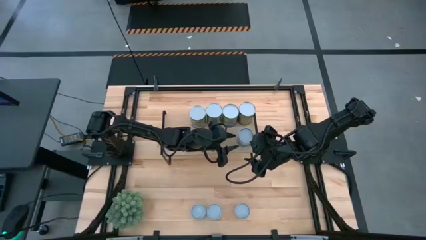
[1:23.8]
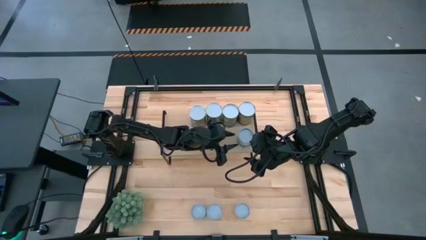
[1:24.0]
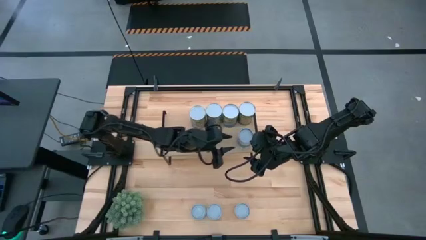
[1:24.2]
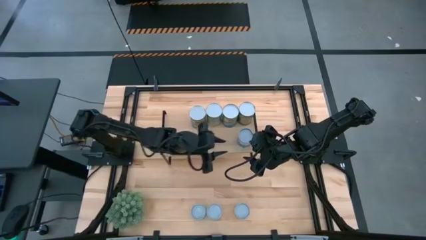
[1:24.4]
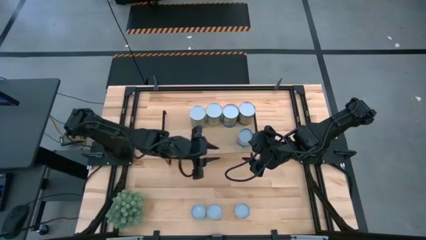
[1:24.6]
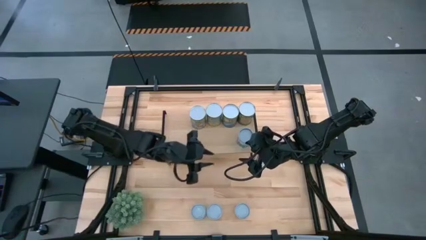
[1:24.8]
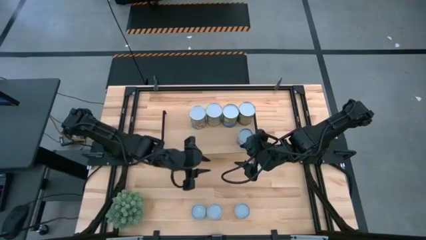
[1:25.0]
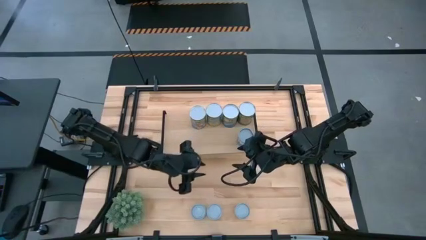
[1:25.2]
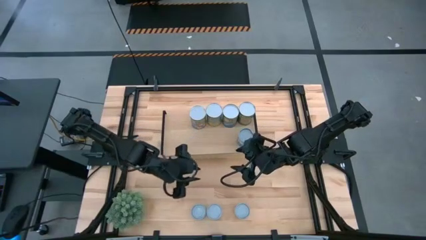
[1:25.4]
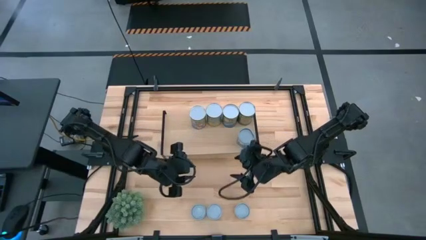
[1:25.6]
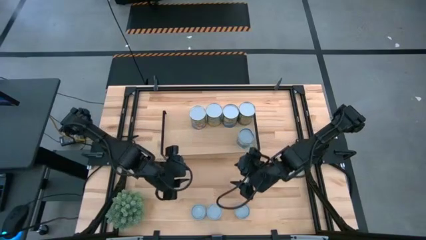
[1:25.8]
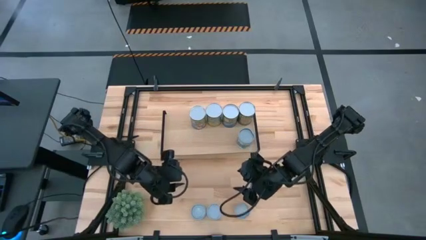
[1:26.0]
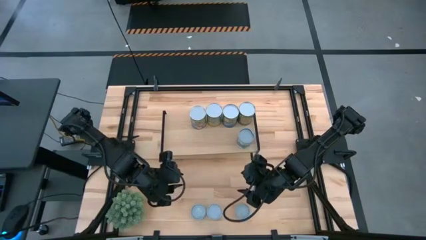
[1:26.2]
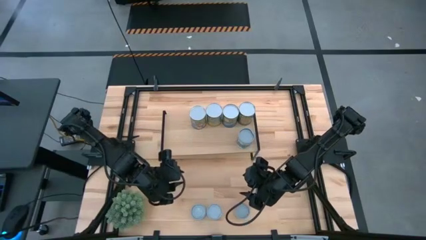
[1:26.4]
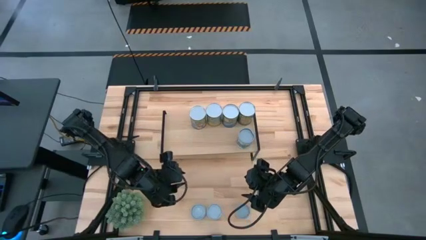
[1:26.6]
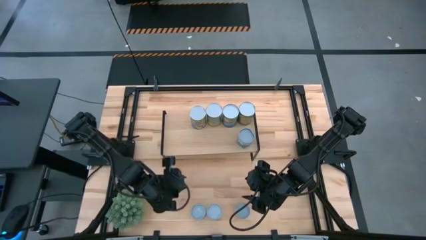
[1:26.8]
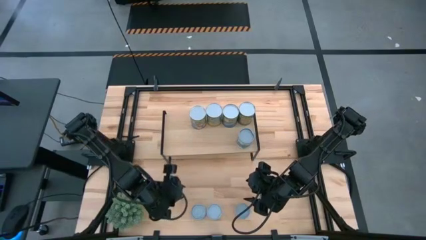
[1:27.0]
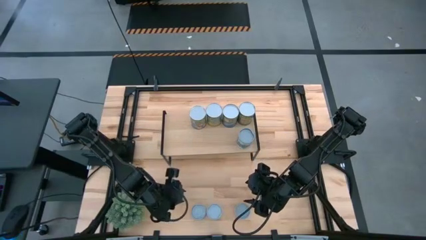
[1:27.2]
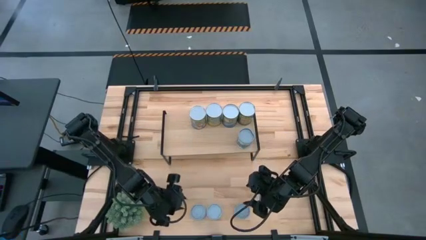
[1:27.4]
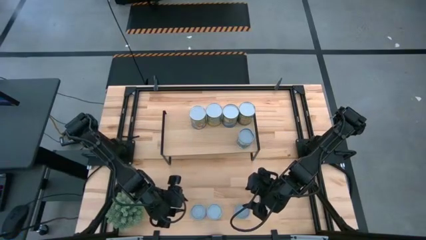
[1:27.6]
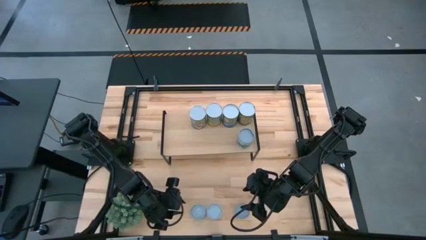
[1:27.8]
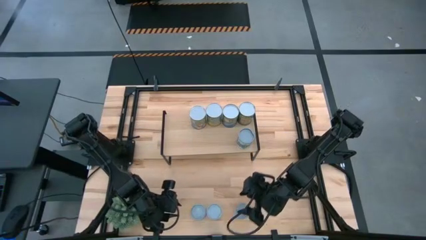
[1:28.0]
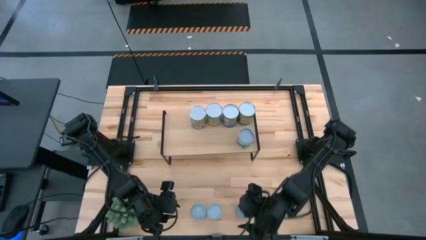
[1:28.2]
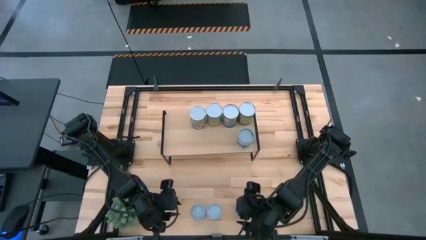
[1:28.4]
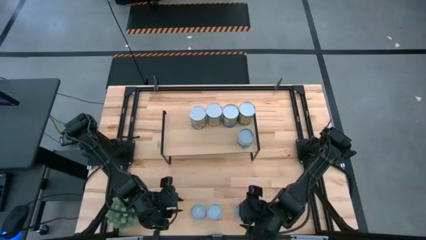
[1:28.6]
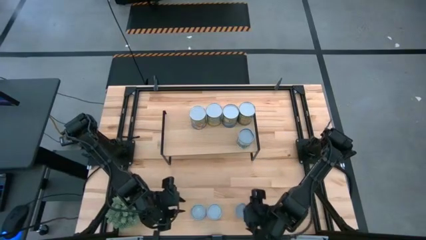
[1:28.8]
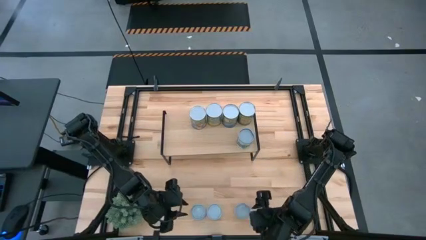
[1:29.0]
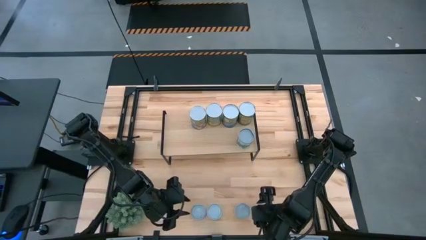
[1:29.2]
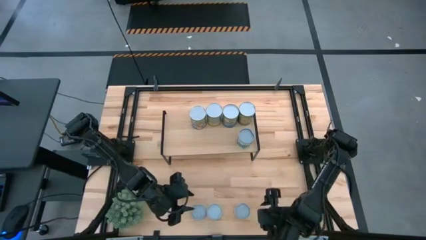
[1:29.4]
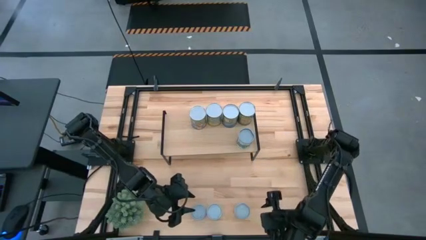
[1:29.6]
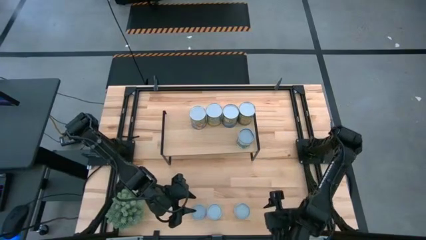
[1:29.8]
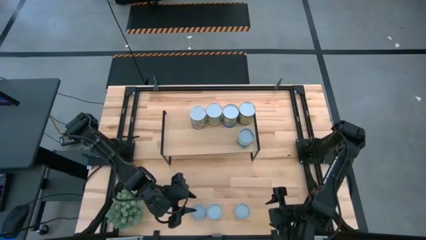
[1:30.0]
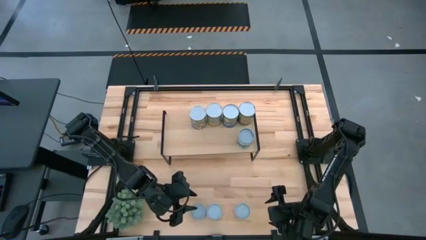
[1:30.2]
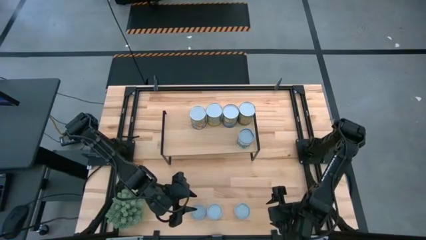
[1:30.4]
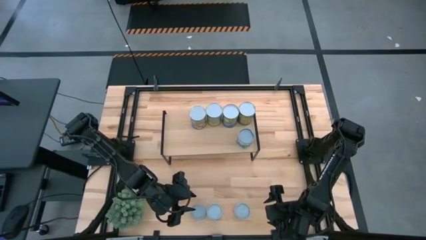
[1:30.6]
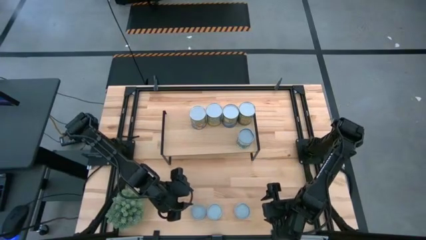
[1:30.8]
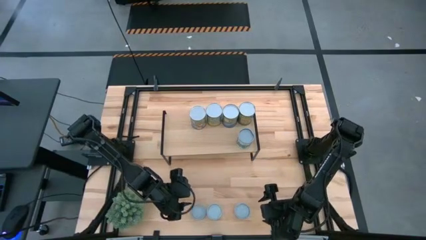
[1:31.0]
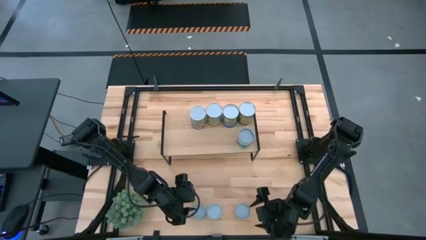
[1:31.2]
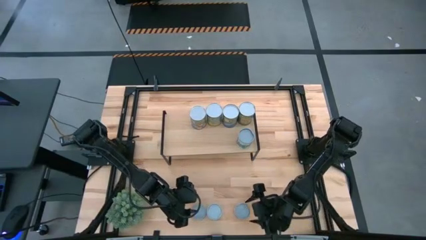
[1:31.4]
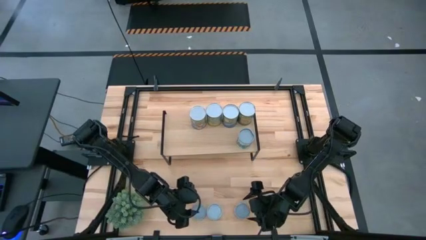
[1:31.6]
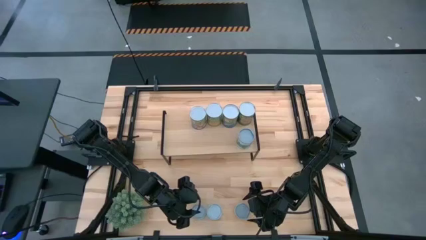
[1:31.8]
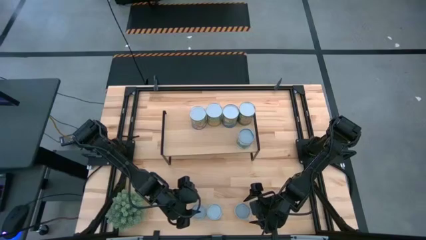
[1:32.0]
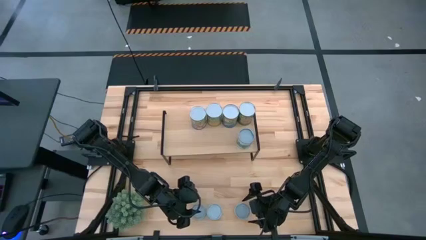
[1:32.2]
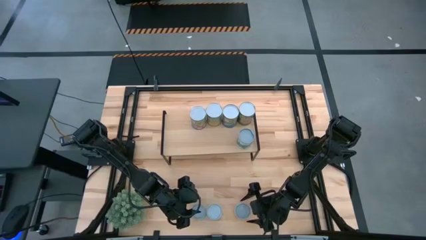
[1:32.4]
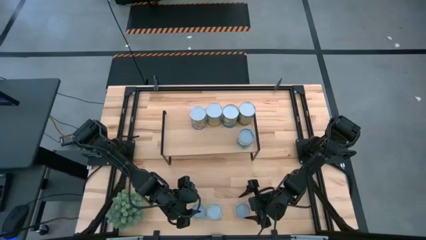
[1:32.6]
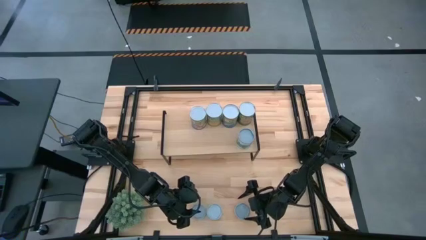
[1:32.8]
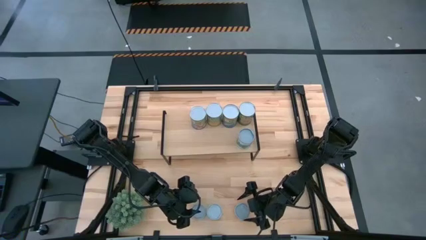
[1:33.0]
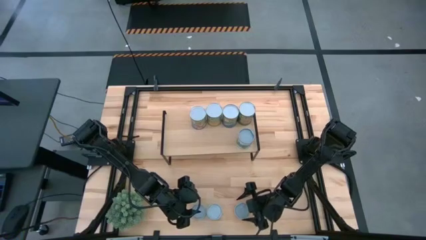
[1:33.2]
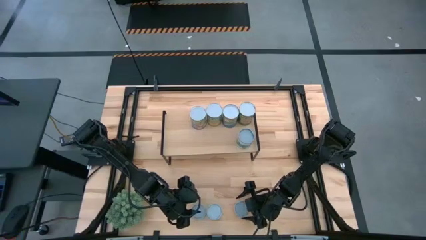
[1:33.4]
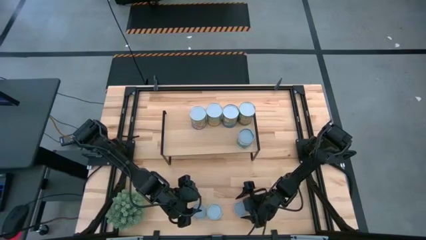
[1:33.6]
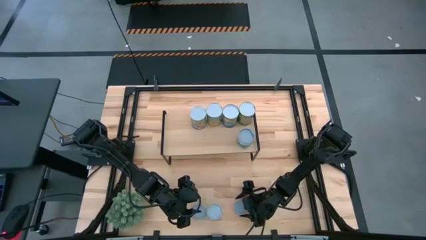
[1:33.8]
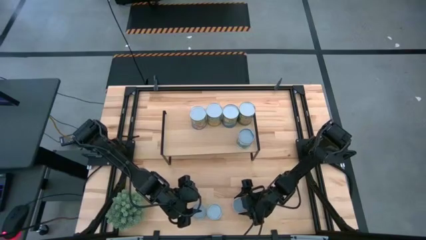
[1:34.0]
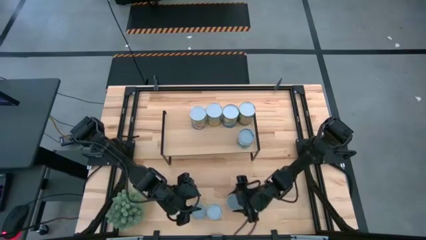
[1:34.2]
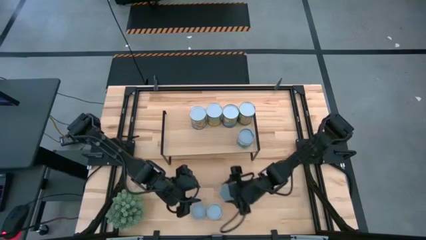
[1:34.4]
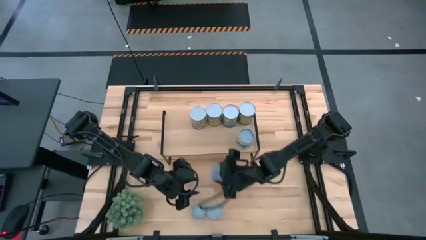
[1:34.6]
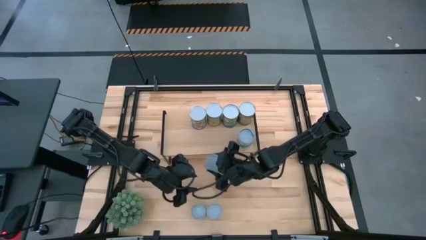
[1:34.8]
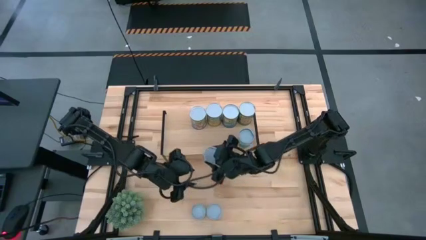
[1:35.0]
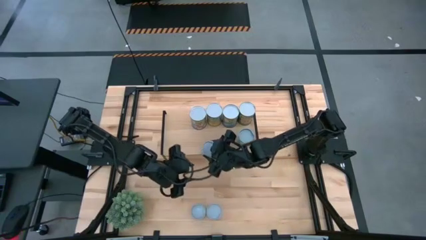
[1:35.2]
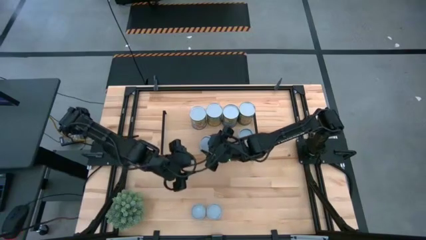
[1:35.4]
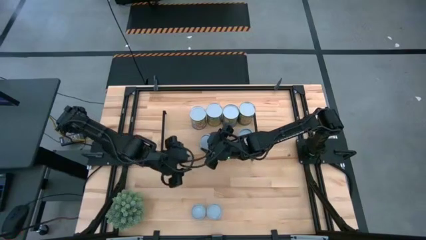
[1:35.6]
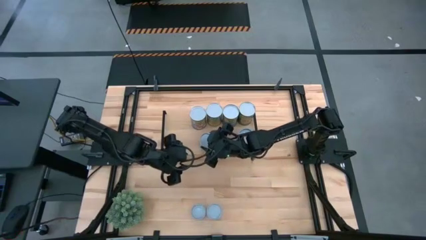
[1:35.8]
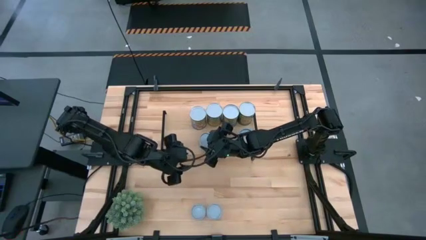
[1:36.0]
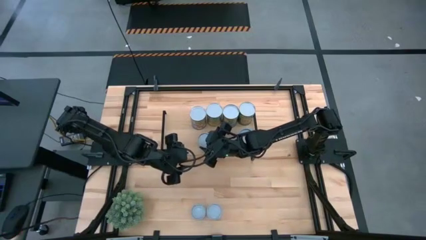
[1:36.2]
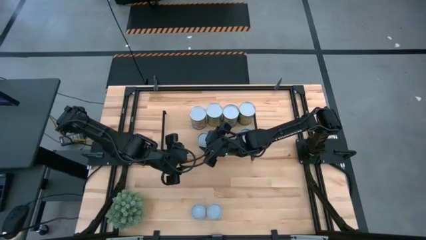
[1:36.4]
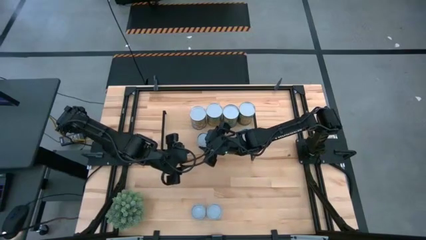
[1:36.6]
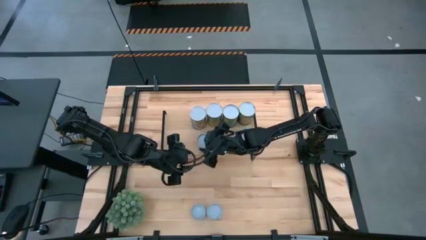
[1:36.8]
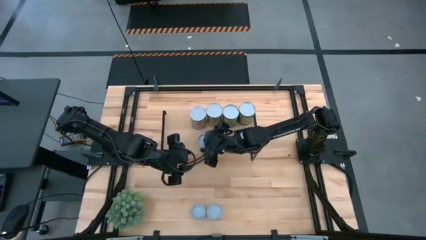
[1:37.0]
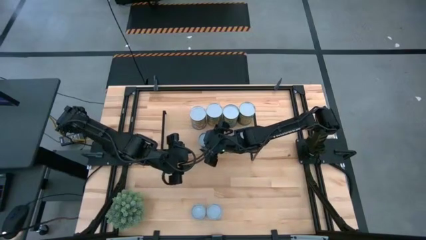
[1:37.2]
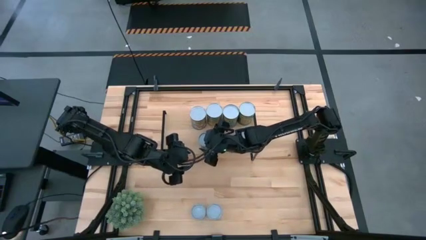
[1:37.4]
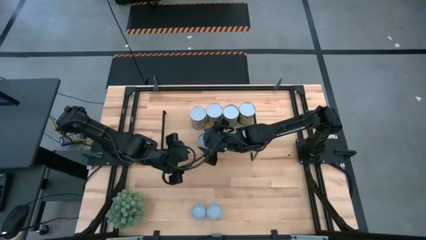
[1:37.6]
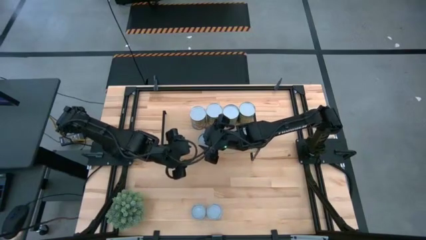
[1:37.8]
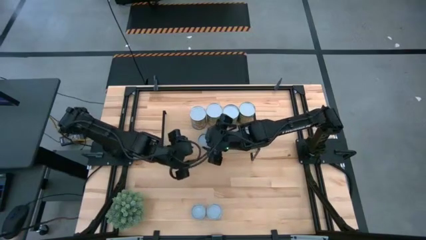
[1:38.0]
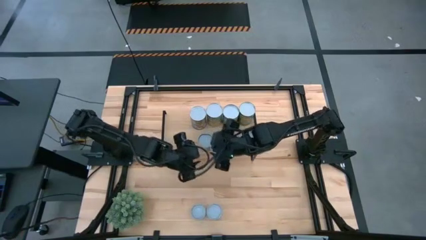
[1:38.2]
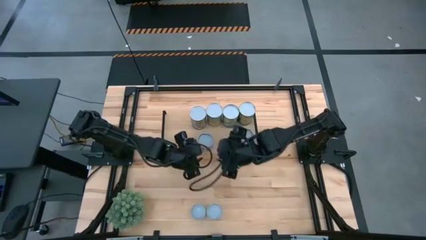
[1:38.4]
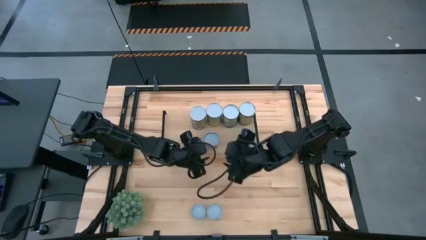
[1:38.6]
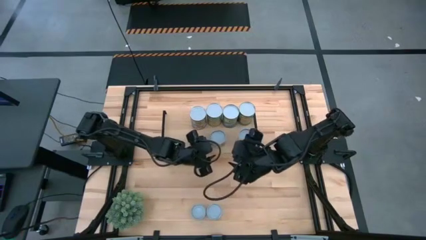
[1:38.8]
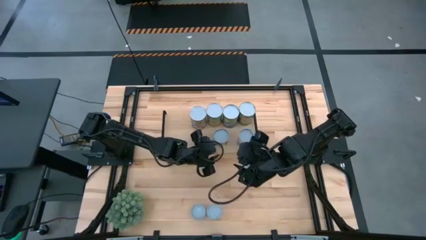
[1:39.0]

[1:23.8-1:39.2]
Task: Pick and place cans onto a shelf
Put the canned diced tomatoes on the shelf

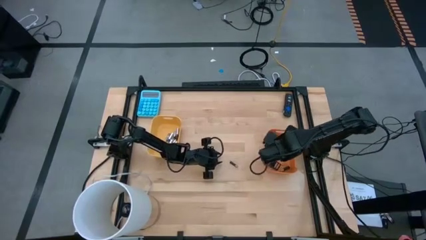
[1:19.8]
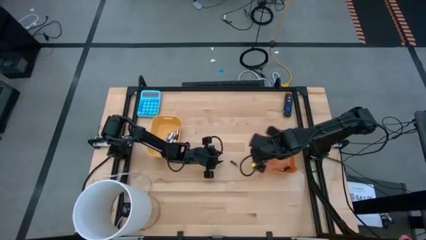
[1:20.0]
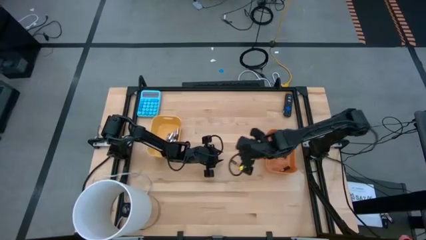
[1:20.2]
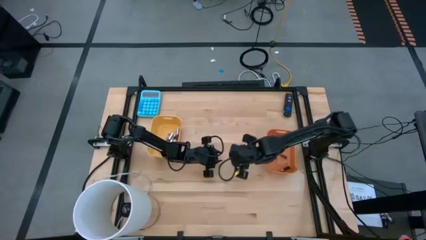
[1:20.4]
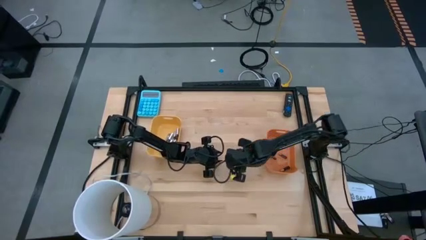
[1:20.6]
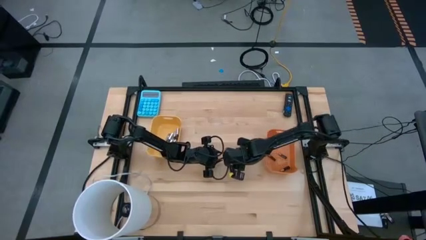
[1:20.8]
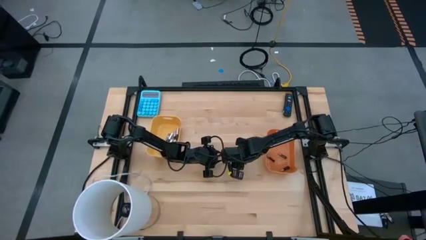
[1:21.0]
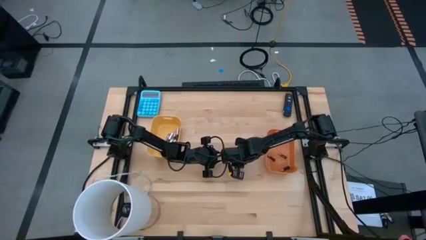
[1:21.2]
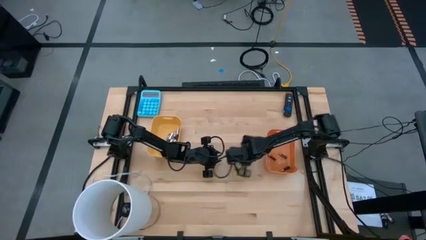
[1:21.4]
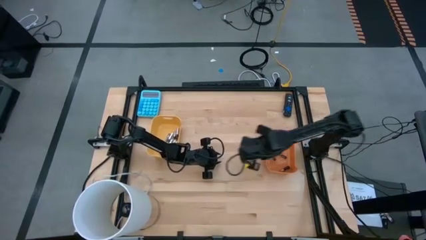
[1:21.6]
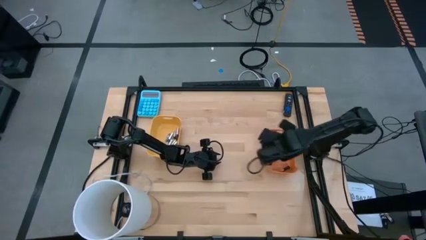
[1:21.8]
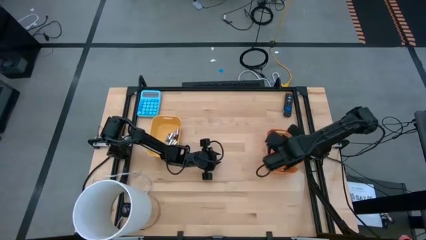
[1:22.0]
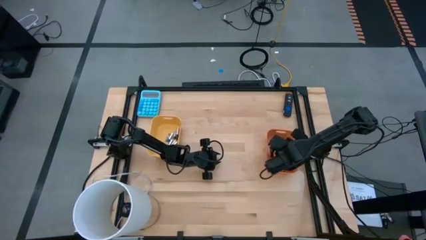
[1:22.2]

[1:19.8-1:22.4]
Task: Sort batteries
Put the black battery into the orange bin
